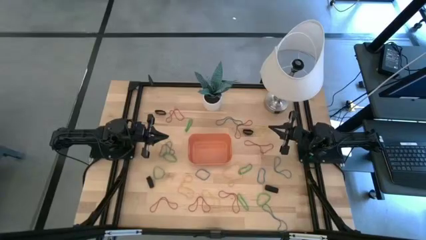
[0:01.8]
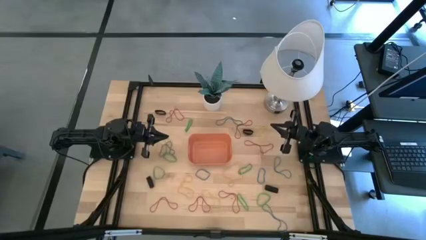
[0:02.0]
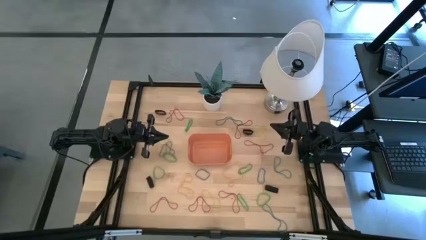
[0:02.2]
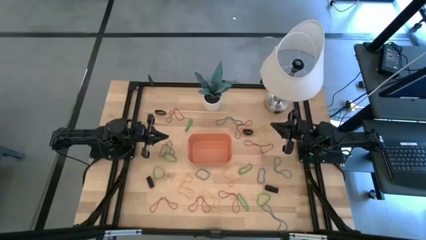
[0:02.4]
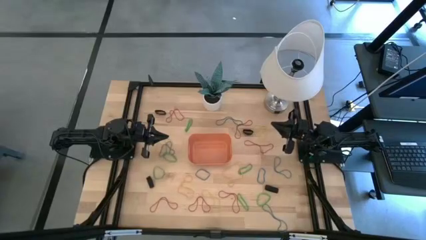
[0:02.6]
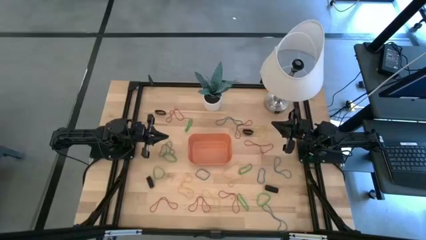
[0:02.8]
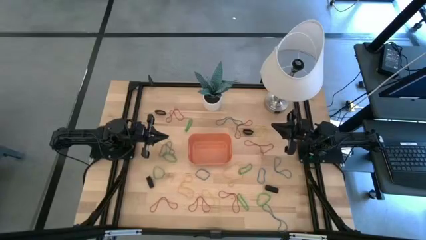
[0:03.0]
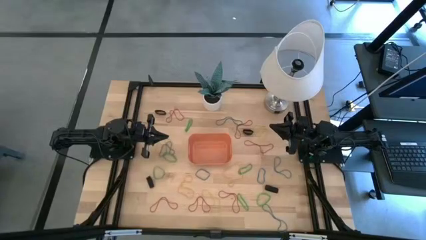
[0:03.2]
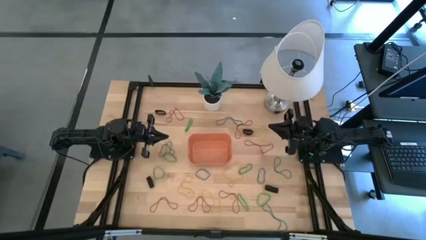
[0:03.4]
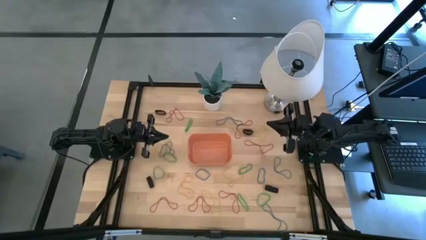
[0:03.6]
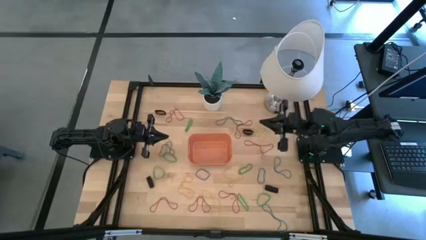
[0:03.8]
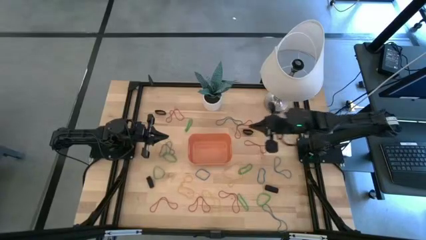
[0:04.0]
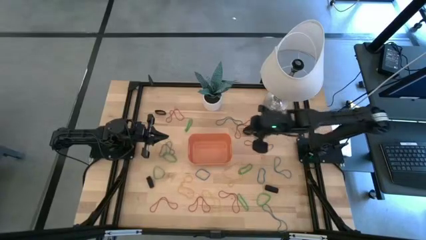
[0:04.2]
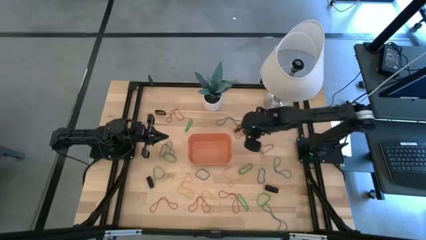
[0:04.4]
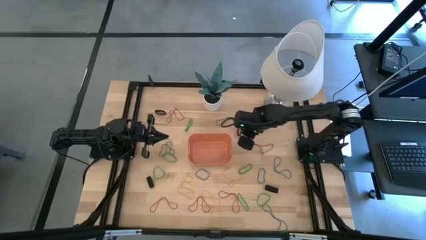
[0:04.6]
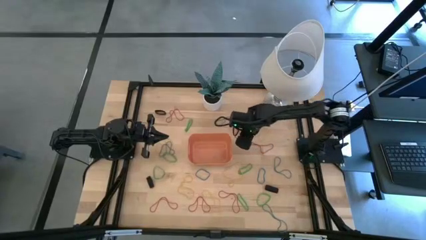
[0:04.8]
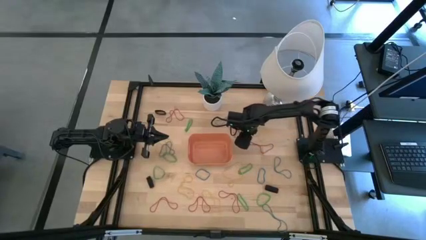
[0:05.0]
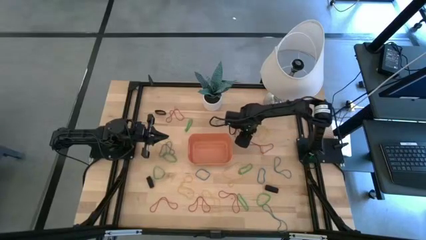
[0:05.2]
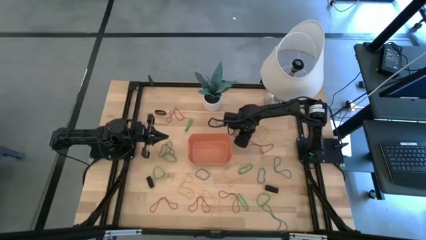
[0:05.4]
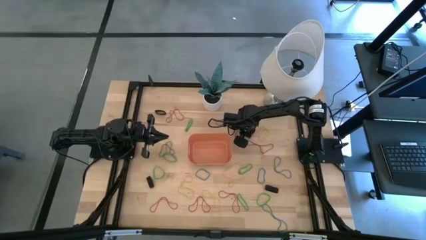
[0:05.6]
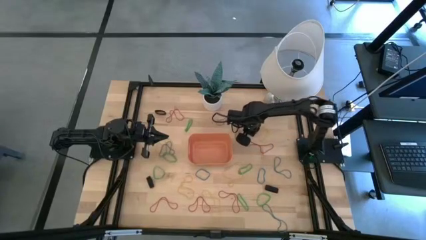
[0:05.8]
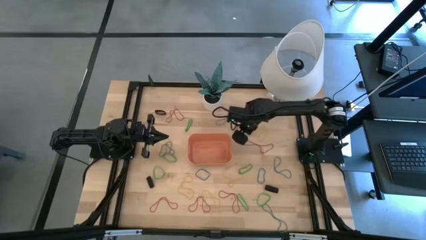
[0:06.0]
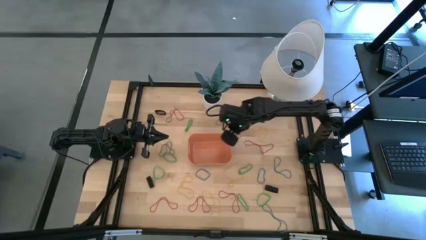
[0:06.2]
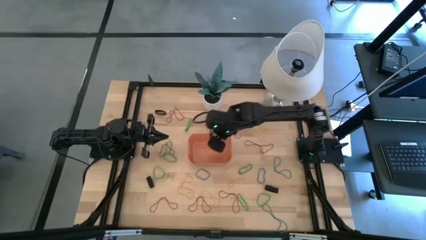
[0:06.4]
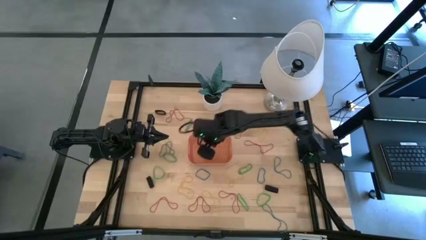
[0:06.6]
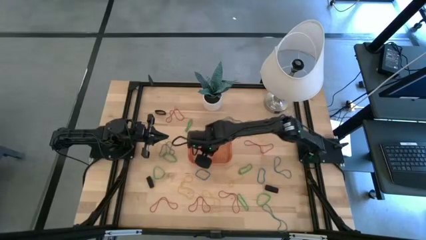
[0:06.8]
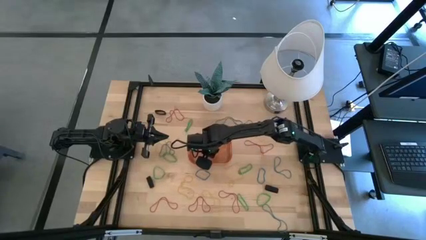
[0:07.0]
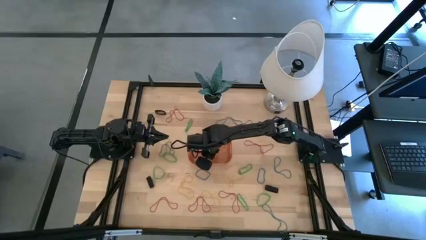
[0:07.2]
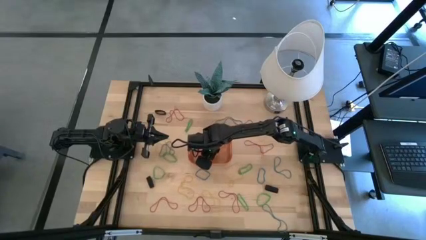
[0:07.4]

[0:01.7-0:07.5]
Task: Pick and place rubber bands into bin
Put the black rubber band into the orange bin

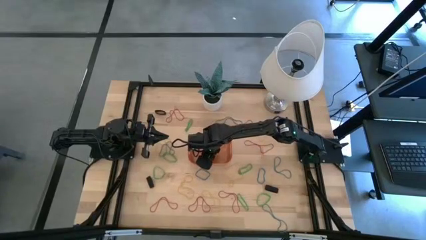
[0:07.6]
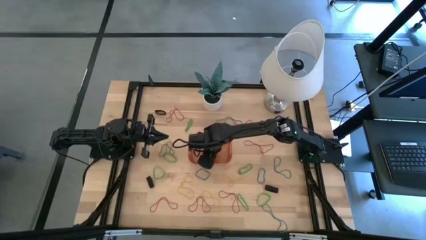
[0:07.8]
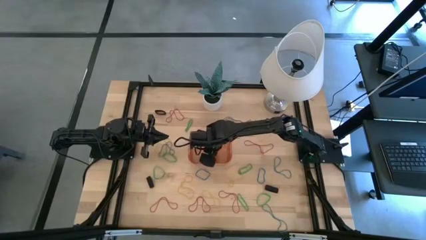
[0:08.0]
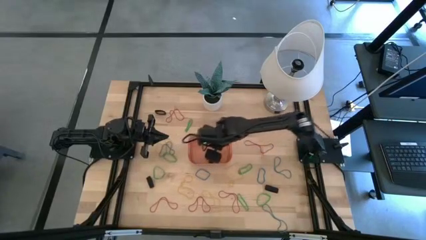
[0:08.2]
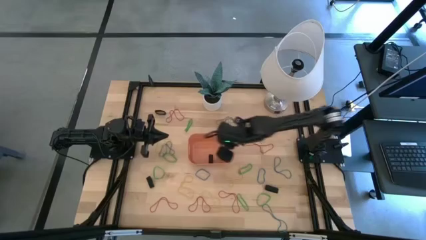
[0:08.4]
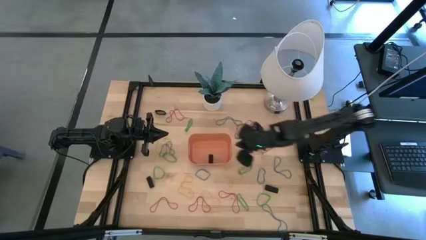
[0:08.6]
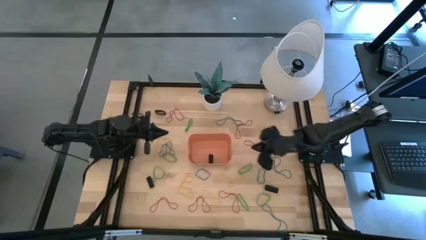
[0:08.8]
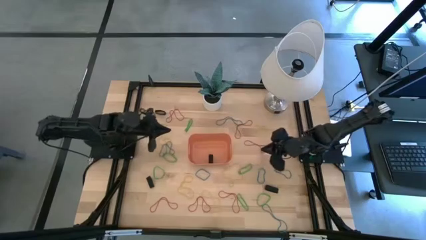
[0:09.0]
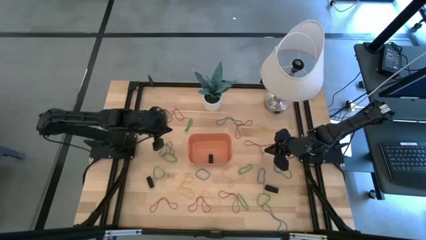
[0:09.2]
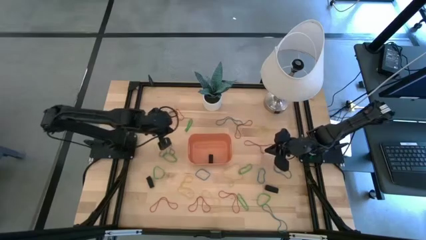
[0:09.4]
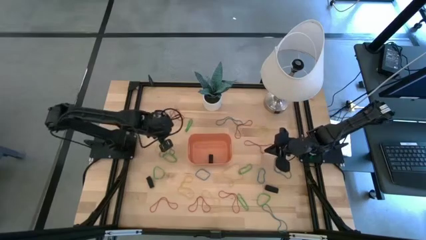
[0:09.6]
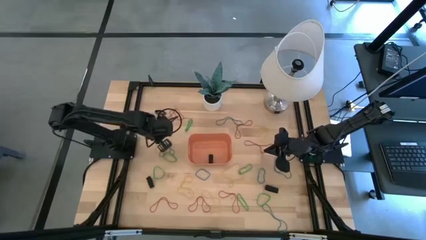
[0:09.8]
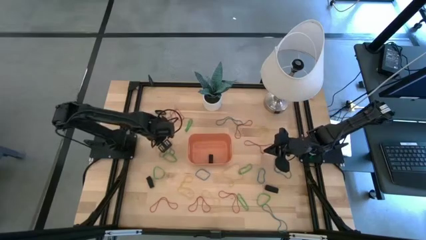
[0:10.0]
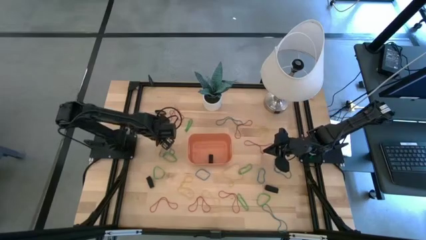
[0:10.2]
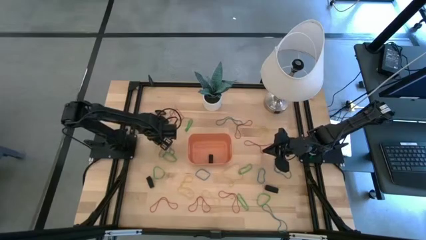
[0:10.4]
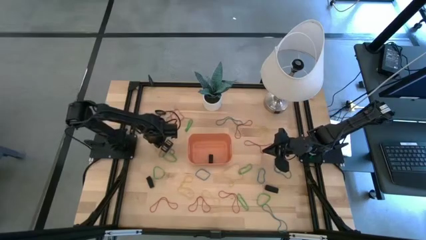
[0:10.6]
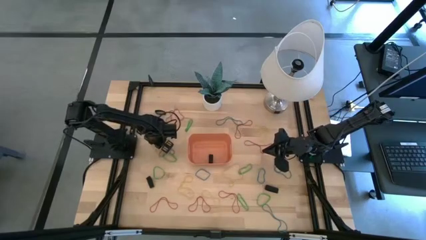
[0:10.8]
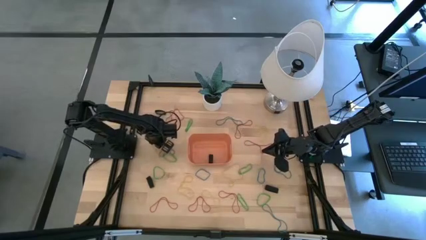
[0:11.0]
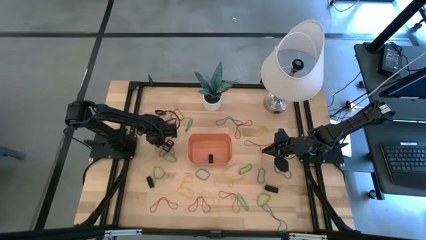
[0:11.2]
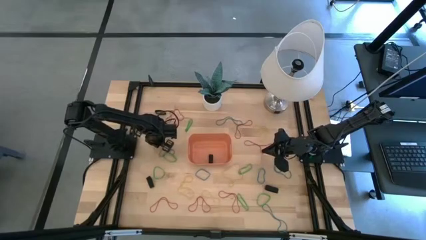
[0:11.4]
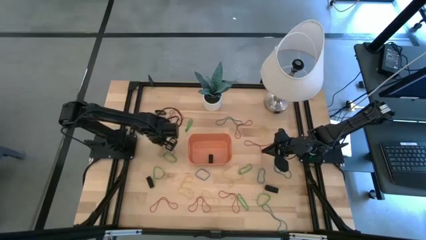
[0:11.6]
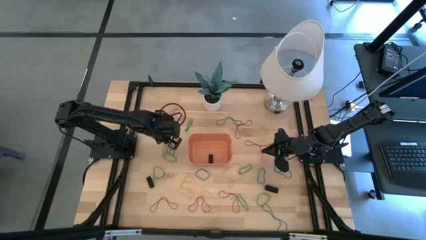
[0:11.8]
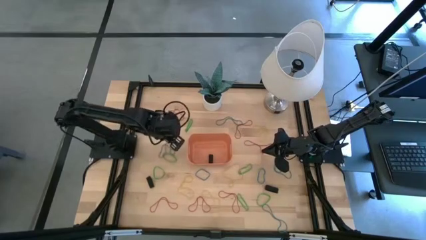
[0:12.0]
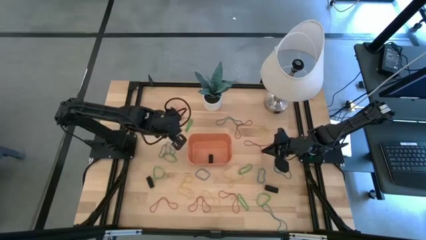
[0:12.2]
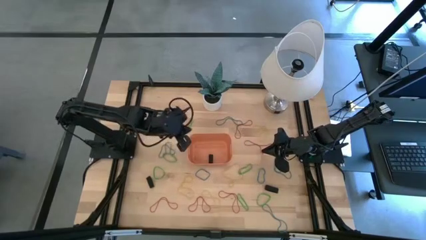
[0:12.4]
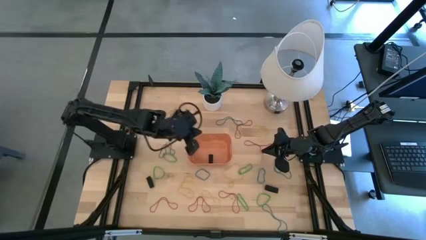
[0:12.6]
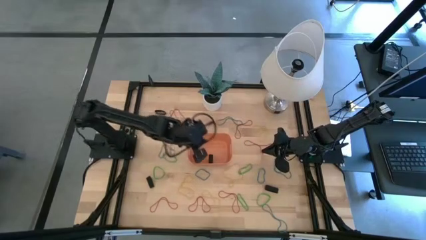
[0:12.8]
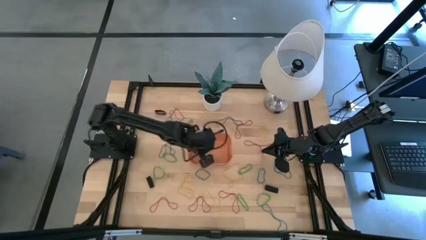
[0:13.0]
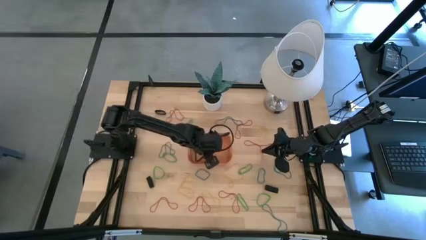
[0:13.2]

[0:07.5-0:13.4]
Put the yellow rubber band into the orange bin

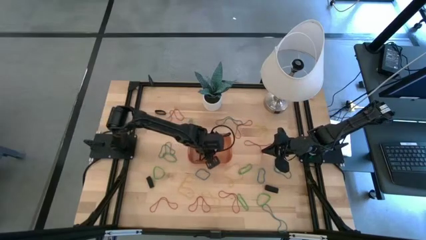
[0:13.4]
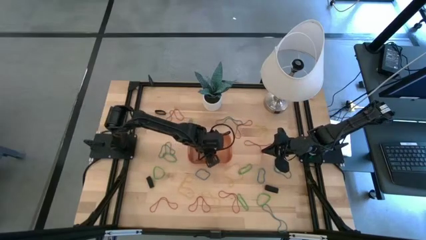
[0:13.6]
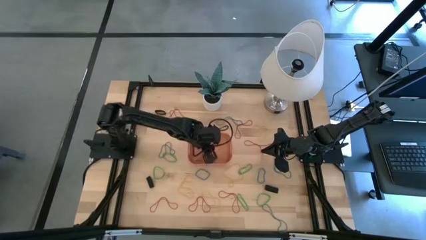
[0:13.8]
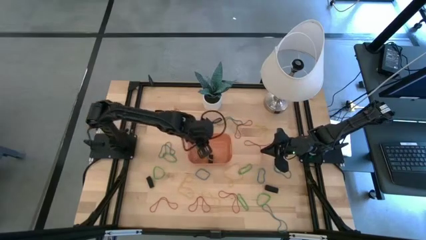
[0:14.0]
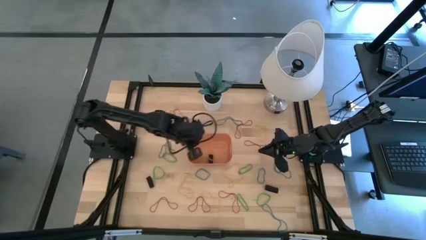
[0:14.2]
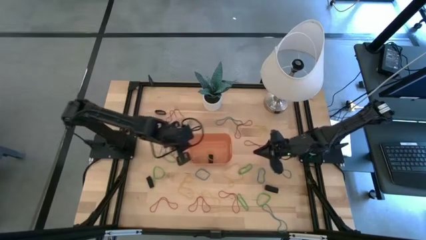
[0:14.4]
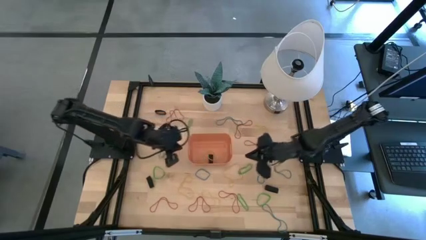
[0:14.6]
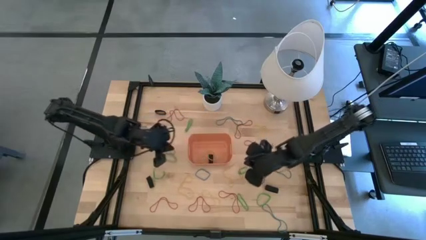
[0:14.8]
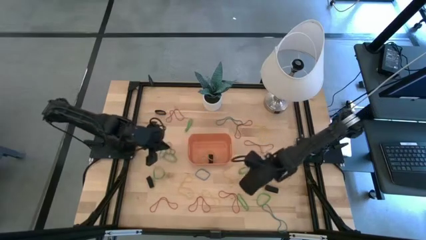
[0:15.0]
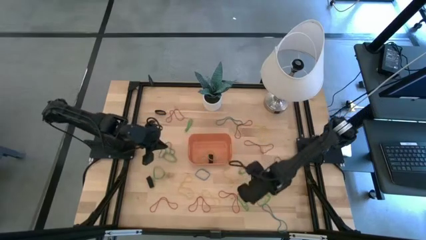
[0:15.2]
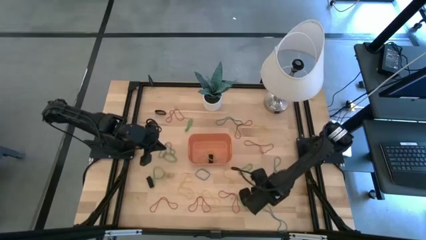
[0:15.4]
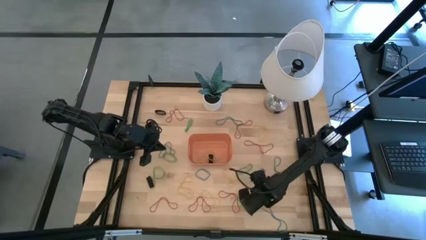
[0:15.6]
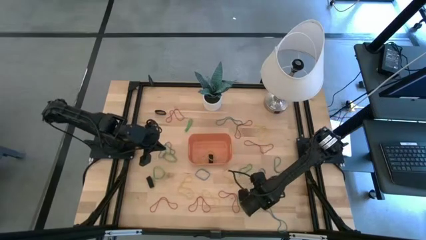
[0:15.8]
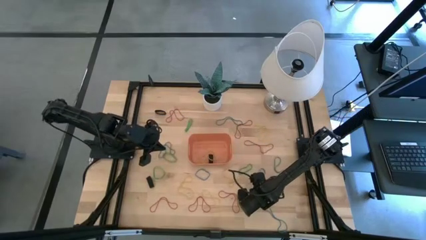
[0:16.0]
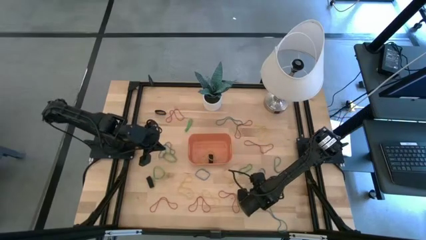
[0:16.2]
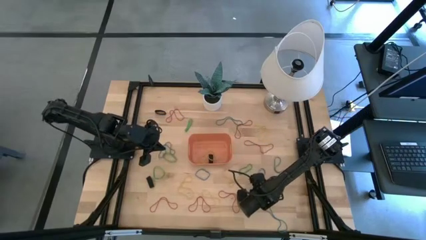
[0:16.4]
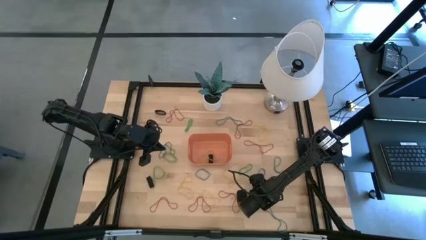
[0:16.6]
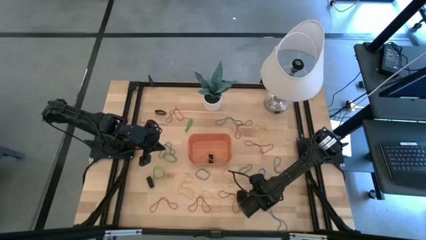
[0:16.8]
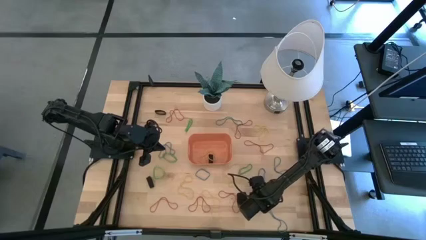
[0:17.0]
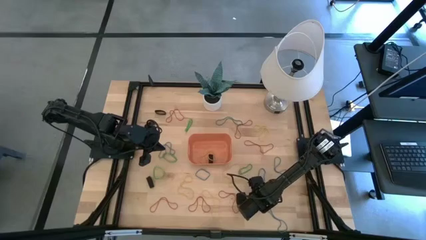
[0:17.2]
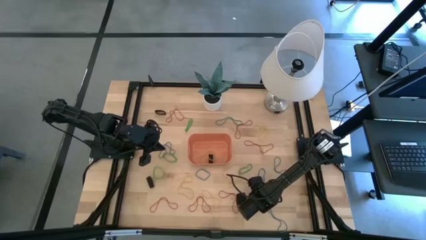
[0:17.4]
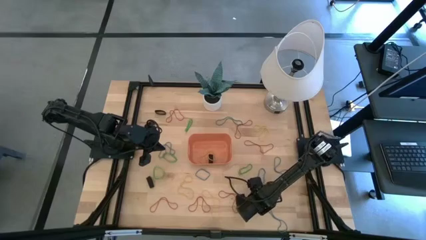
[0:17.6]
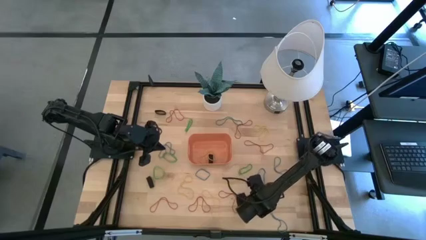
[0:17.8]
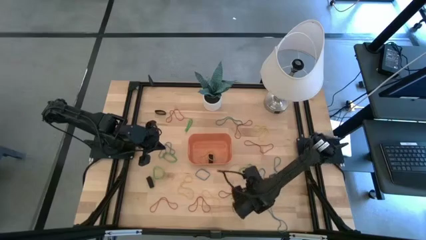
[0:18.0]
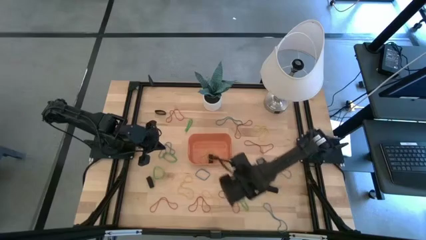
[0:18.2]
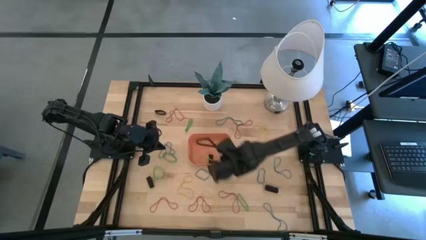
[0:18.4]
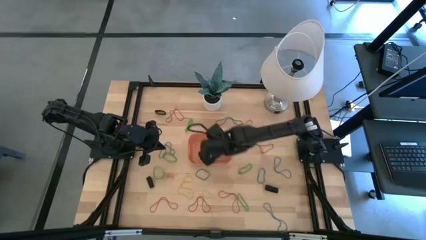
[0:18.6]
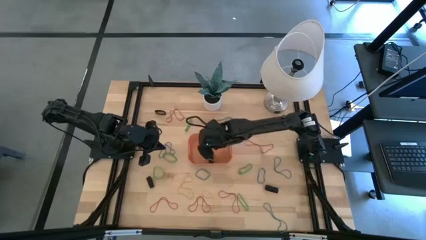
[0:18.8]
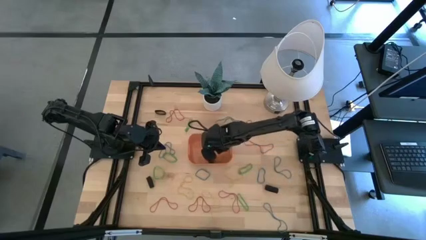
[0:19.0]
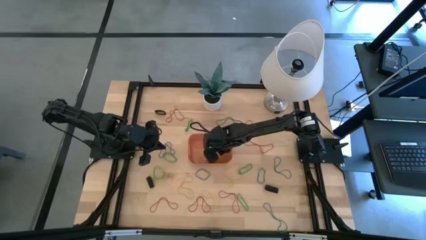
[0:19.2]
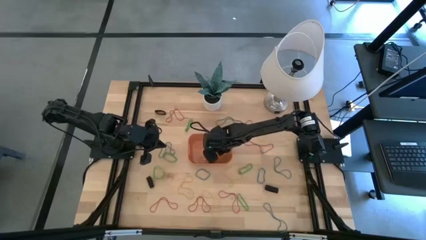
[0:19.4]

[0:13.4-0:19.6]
Put the green rubber band into the orange bin
